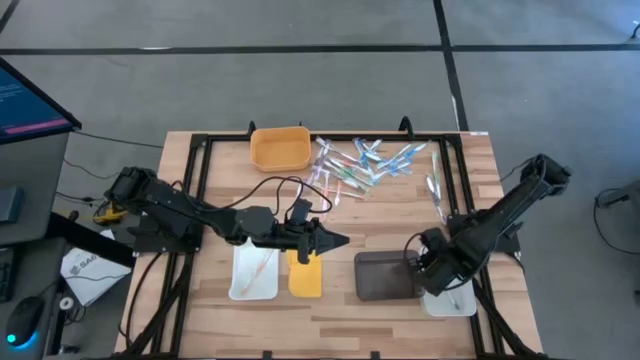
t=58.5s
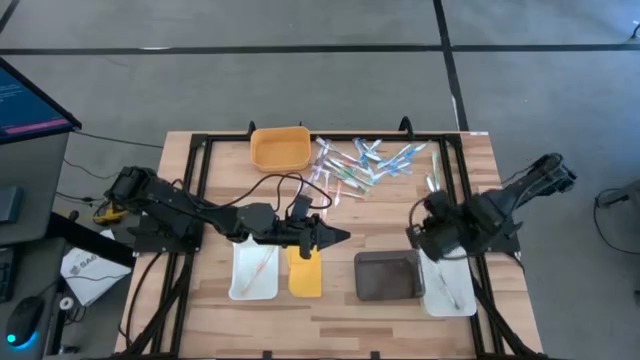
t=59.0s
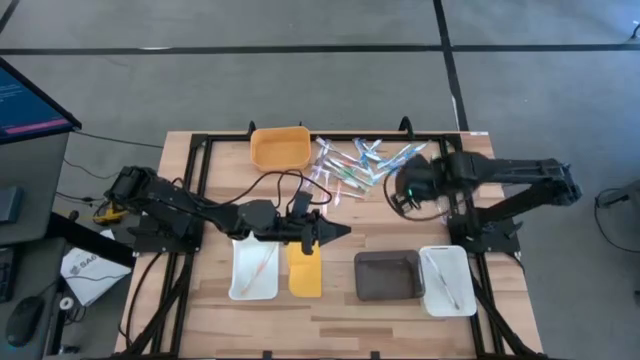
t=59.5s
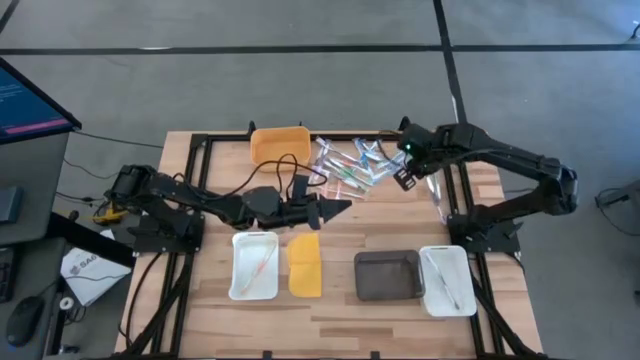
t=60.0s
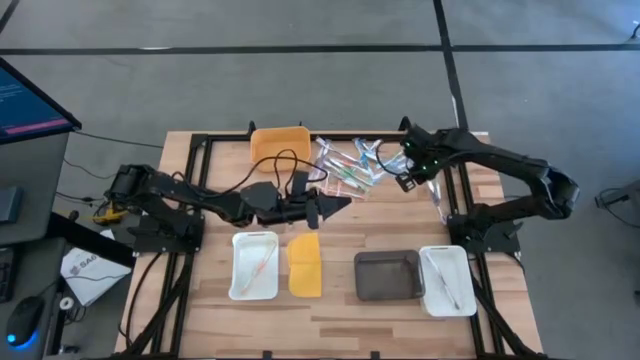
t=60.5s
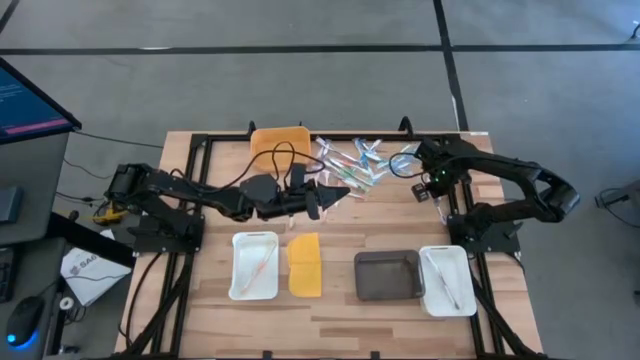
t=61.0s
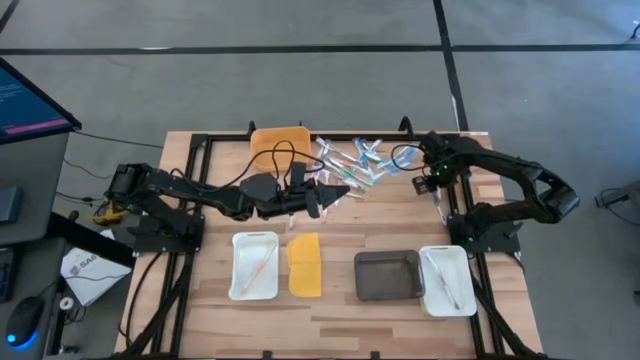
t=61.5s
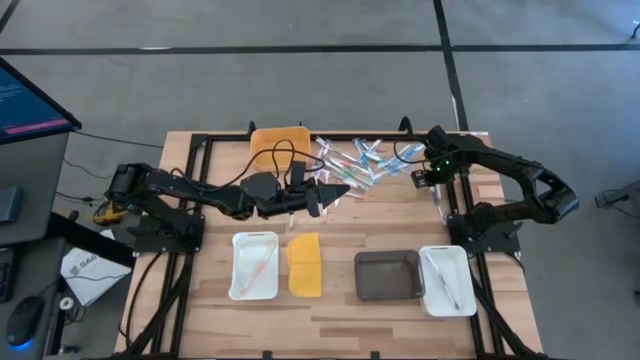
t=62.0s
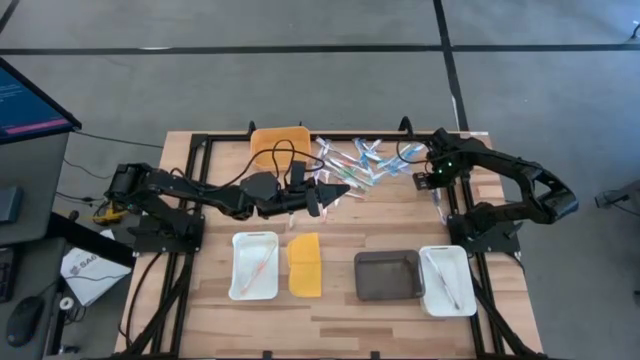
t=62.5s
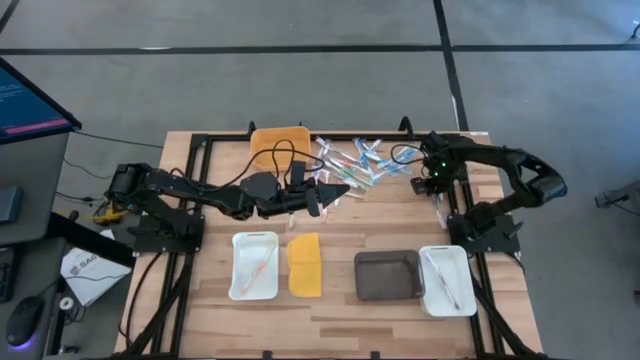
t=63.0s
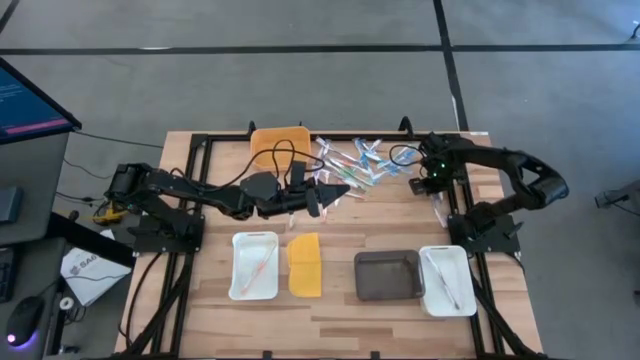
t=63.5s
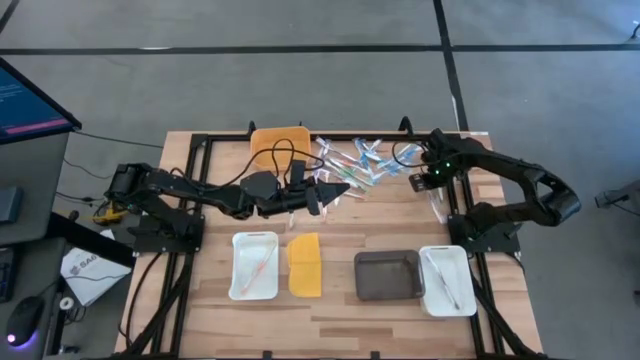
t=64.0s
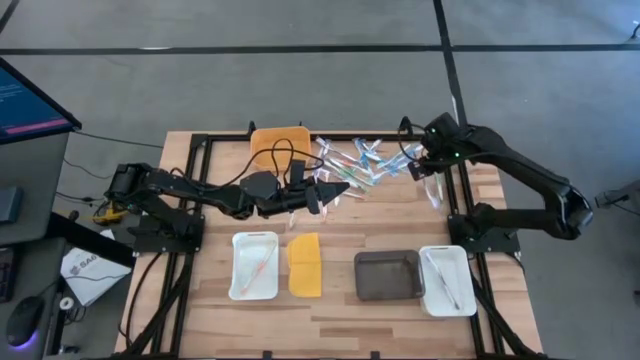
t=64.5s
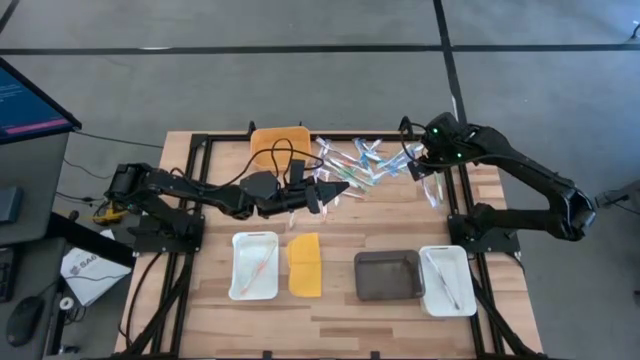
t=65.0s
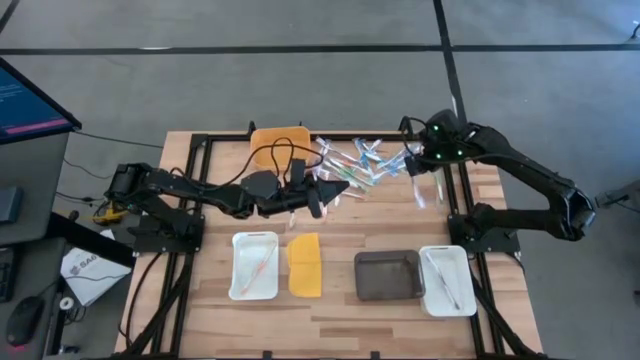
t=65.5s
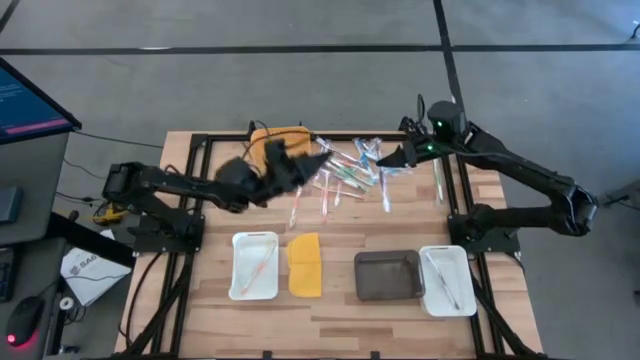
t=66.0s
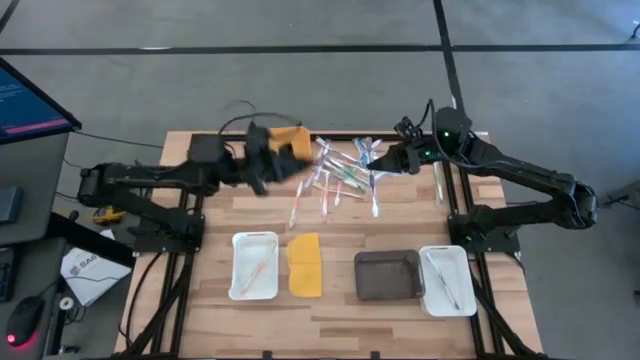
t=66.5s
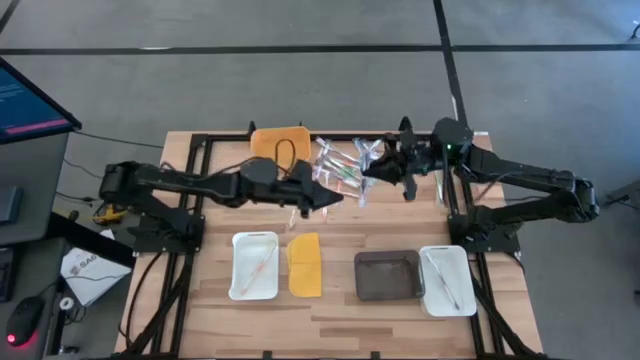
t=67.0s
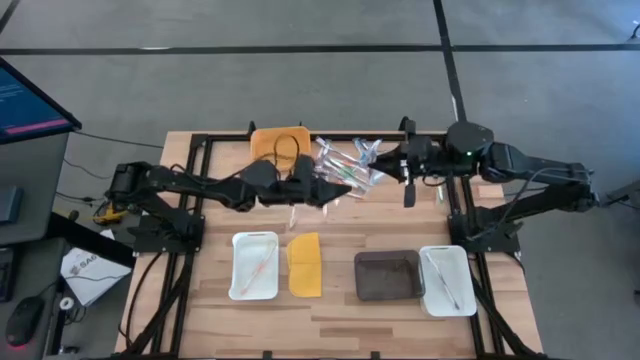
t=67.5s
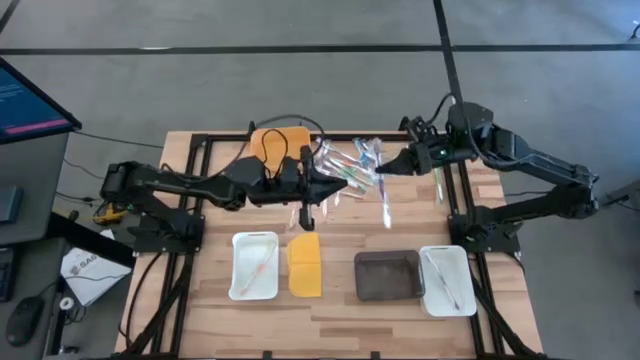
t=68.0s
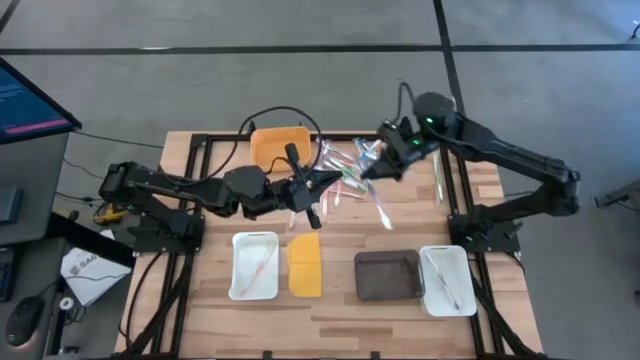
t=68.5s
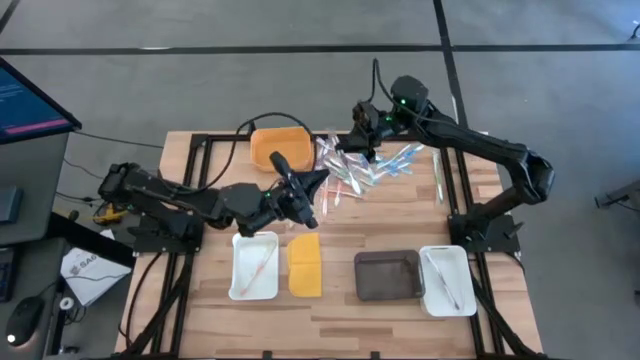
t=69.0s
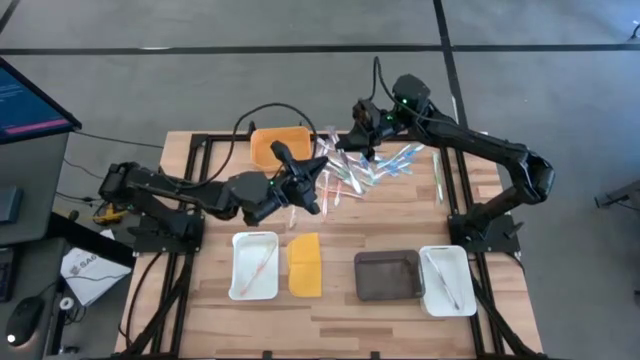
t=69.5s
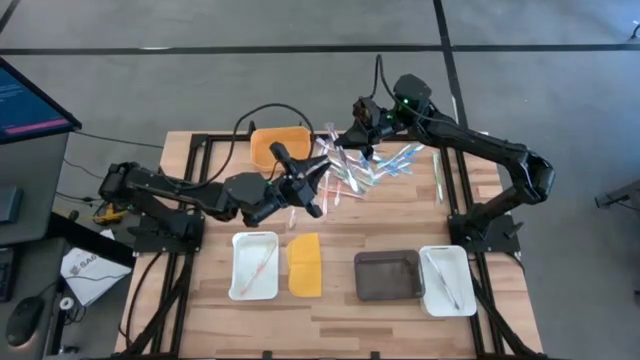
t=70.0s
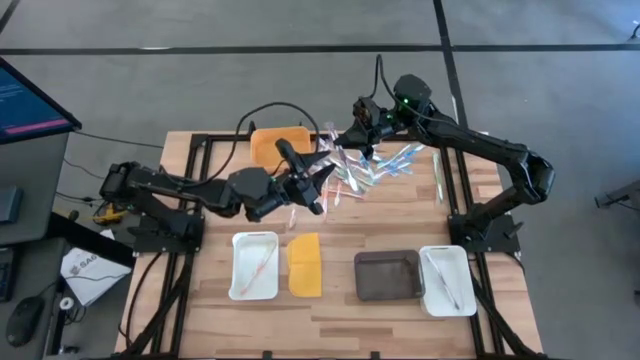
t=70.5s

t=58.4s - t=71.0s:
Task: Pick & Place Toothbrushes
Put the purple toothbrush into the right white bin

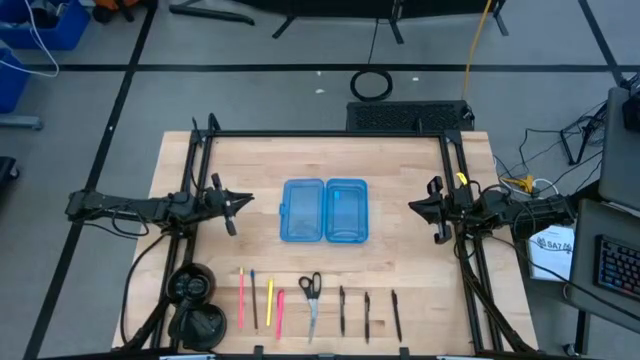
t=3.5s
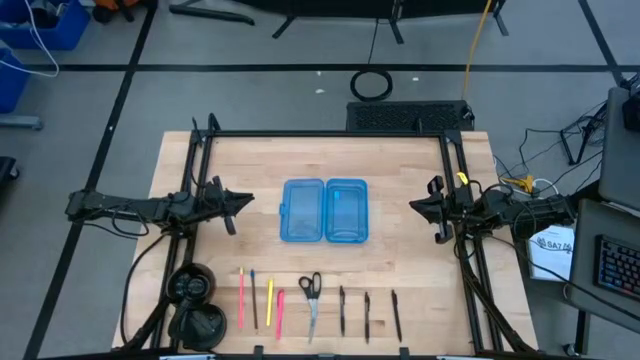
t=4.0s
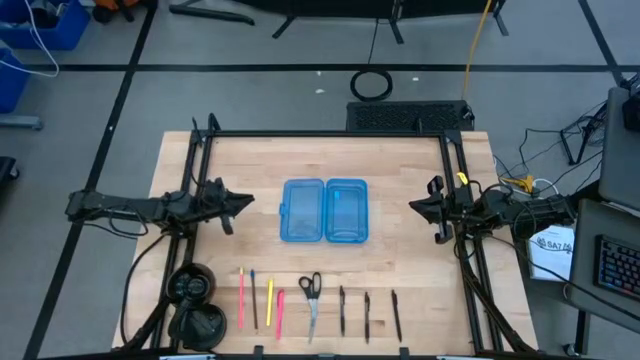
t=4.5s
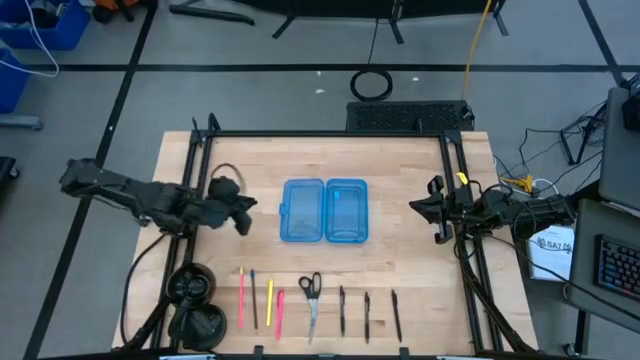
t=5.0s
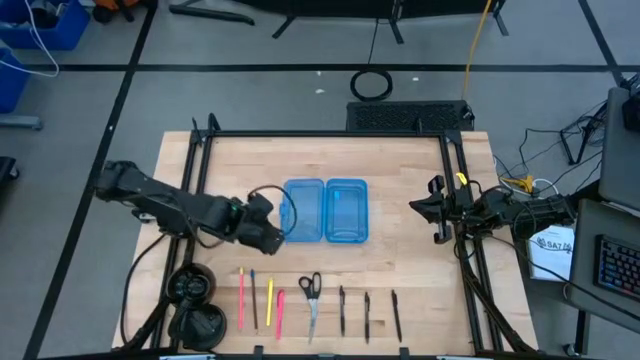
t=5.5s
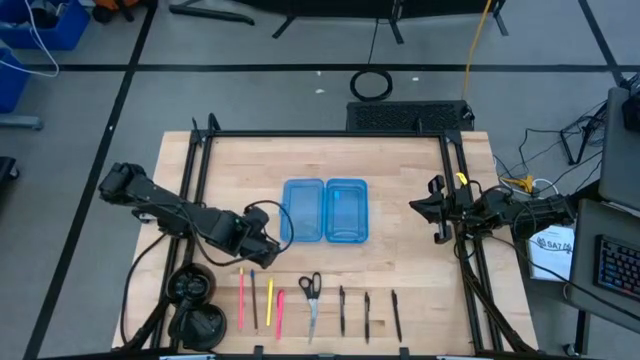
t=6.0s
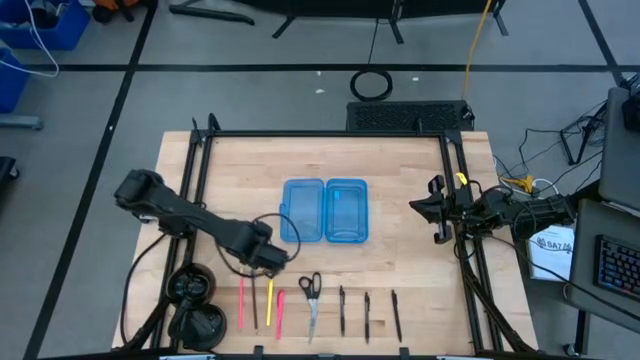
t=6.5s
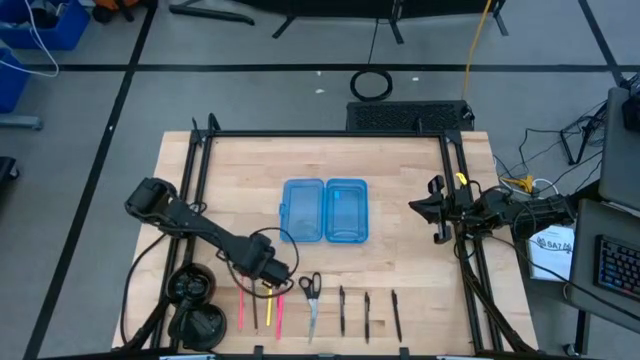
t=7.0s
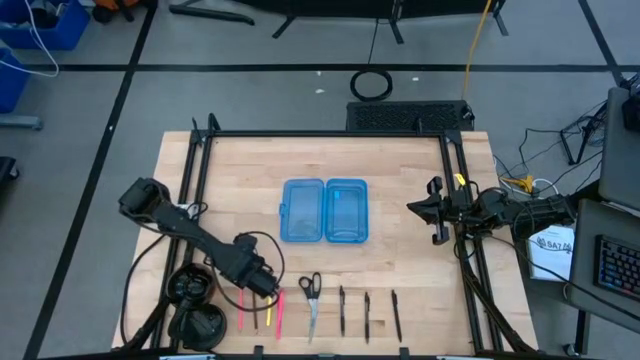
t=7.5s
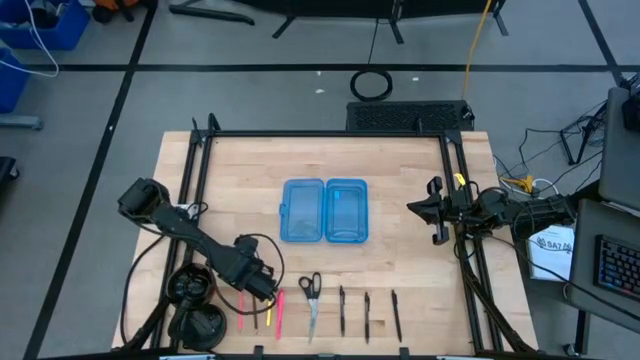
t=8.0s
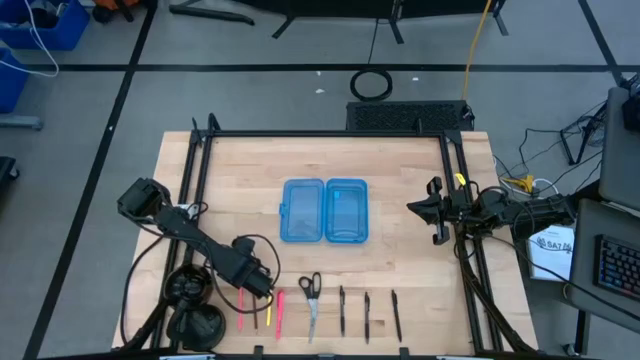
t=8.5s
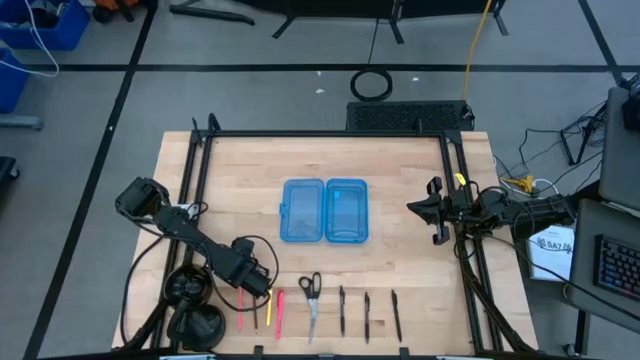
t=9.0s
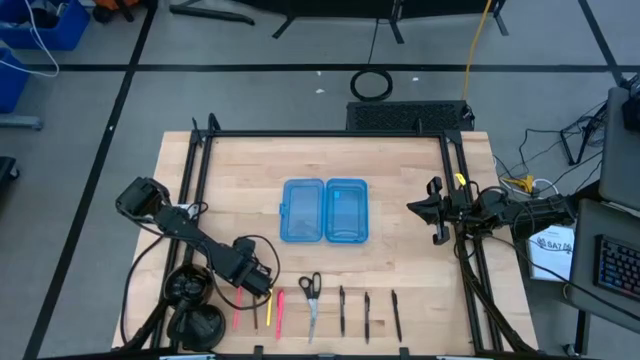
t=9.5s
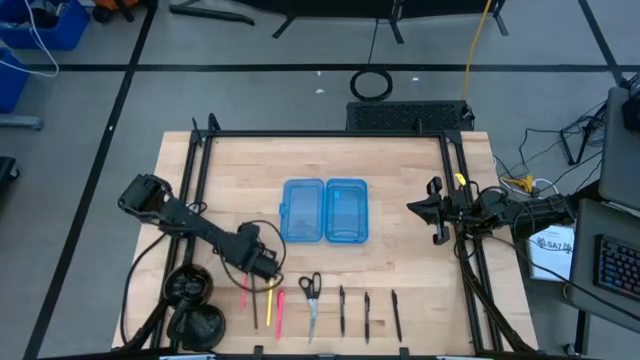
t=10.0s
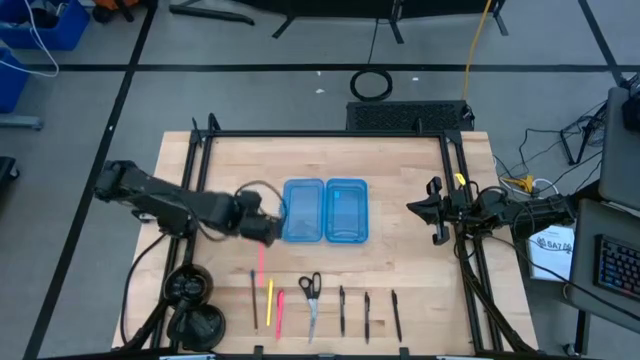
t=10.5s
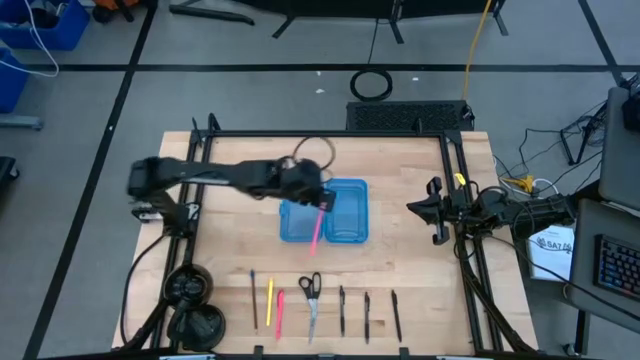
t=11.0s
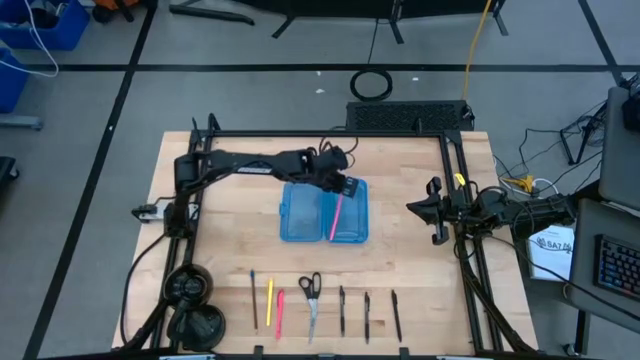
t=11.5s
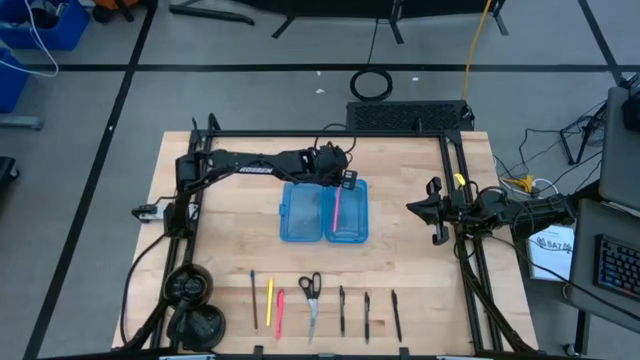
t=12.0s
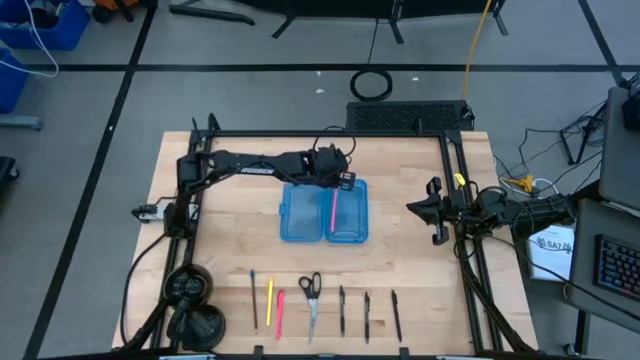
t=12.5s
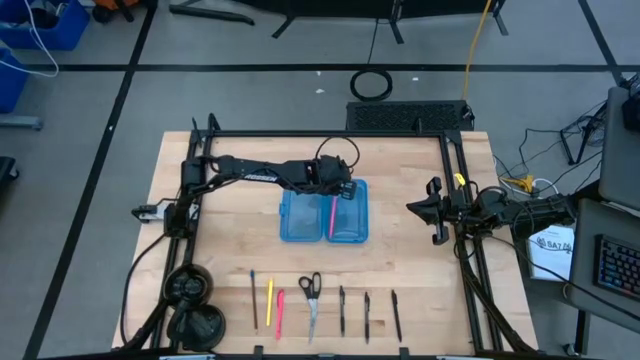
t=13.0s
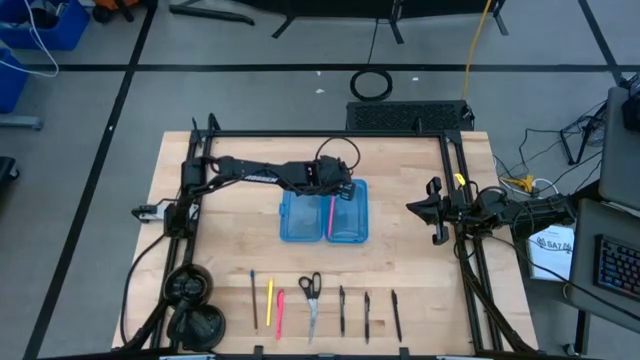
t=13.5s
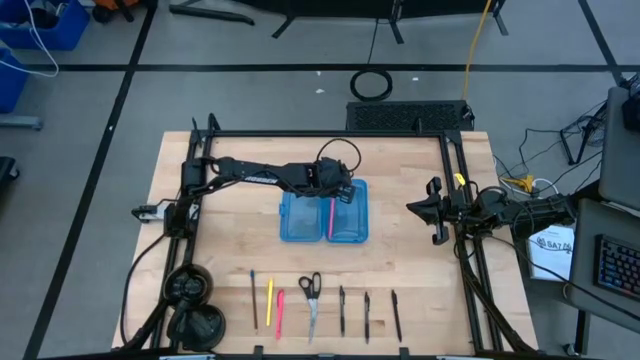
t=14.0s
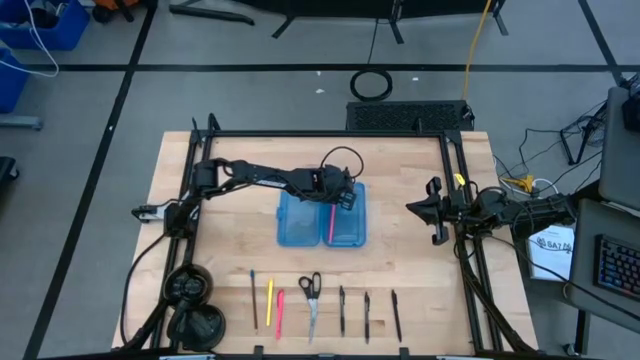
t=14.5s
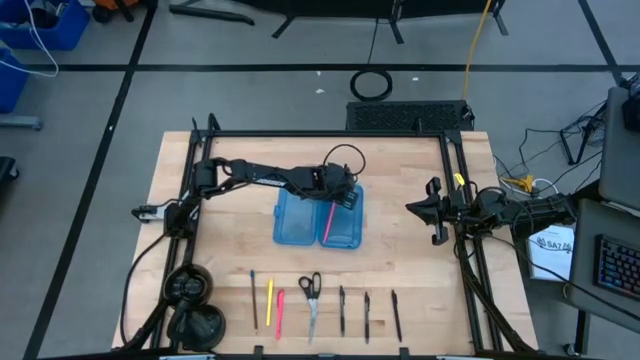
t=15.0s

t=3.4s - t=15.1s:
Task: Pick & place school supplies into a supply box
Put the pink pencil into the blue supply box
